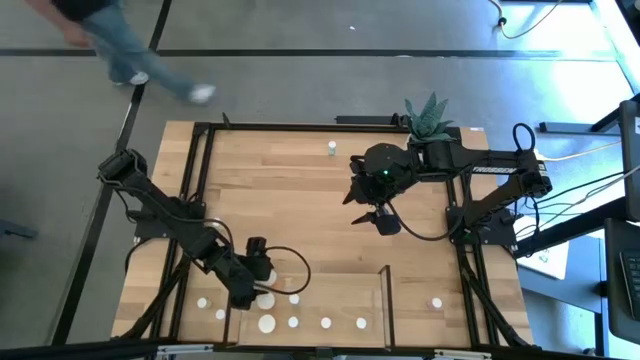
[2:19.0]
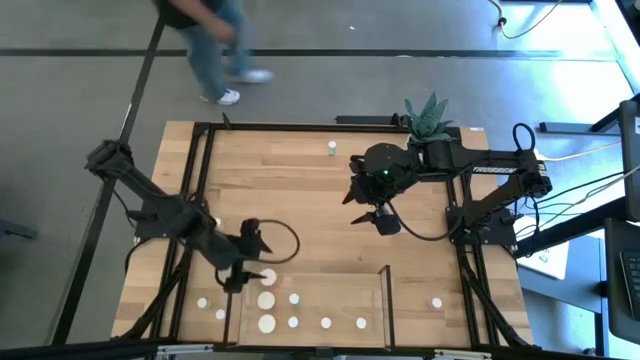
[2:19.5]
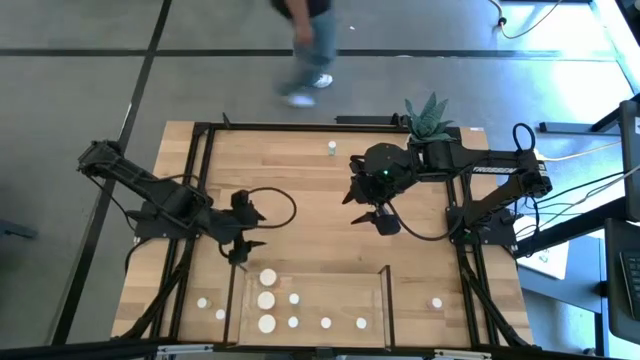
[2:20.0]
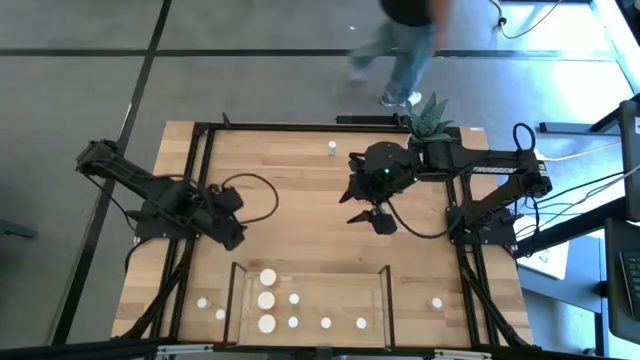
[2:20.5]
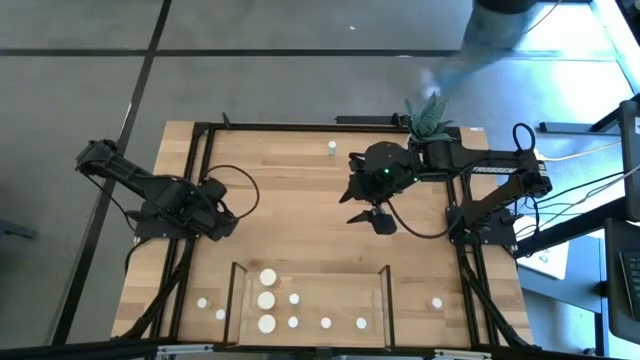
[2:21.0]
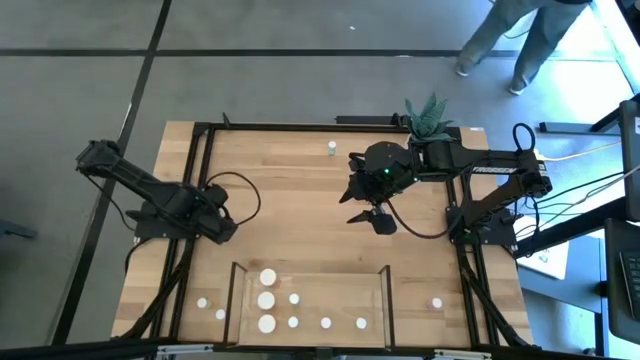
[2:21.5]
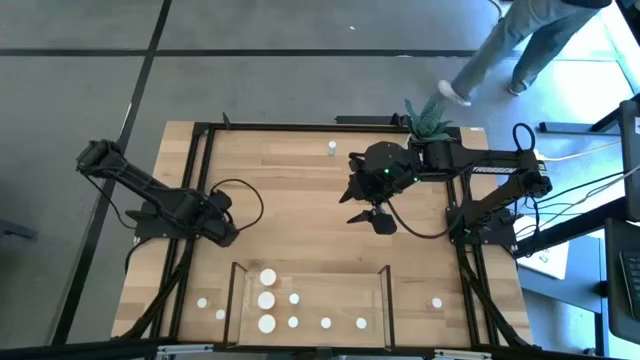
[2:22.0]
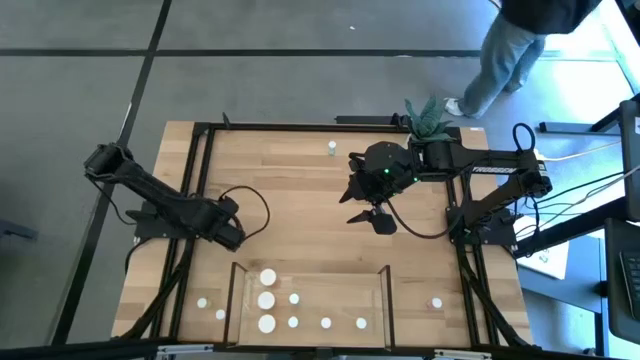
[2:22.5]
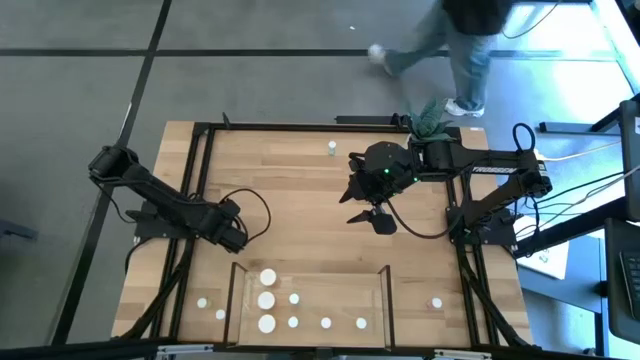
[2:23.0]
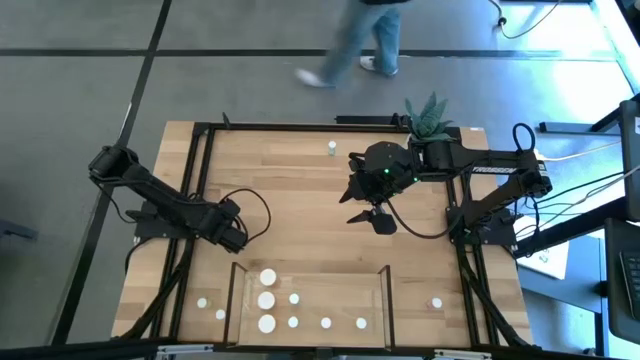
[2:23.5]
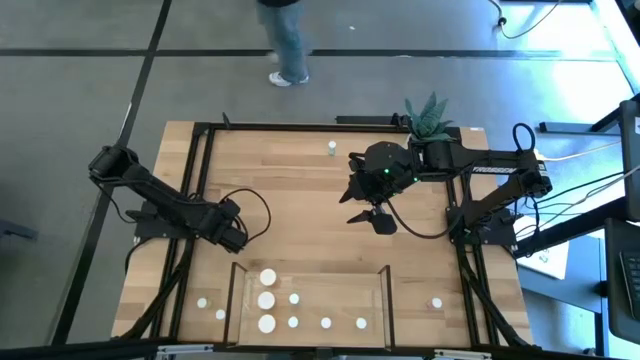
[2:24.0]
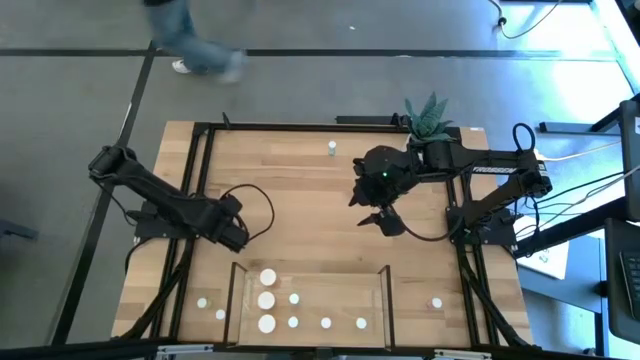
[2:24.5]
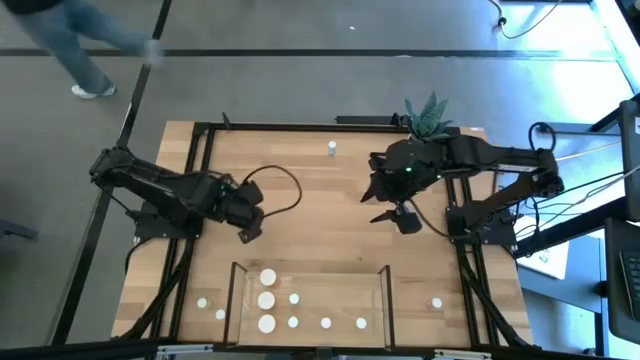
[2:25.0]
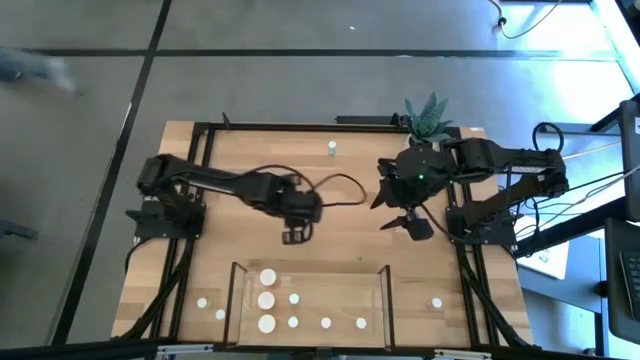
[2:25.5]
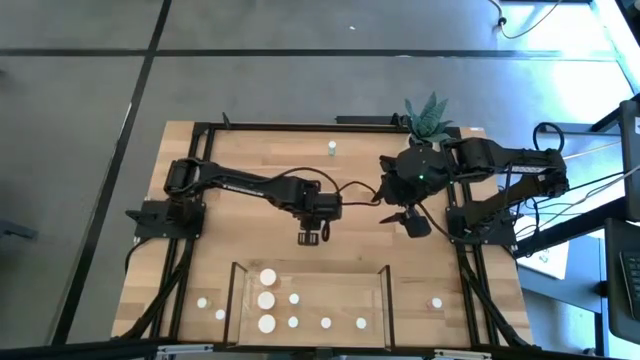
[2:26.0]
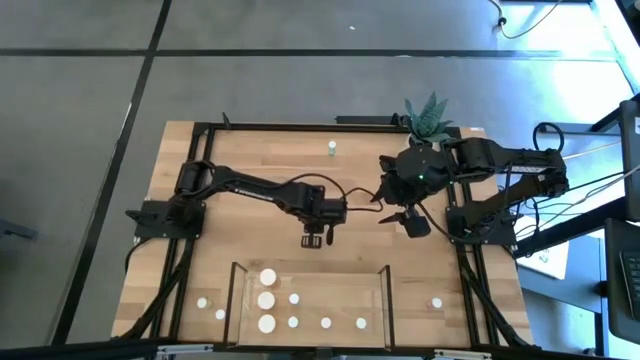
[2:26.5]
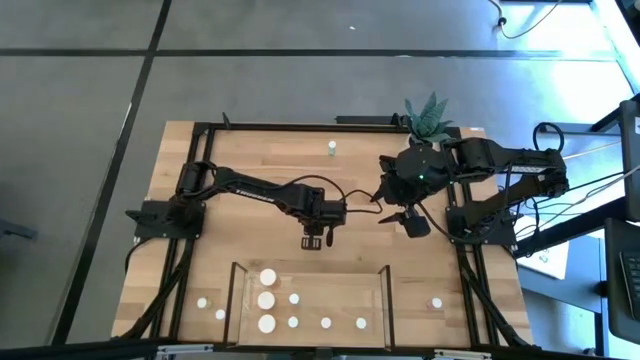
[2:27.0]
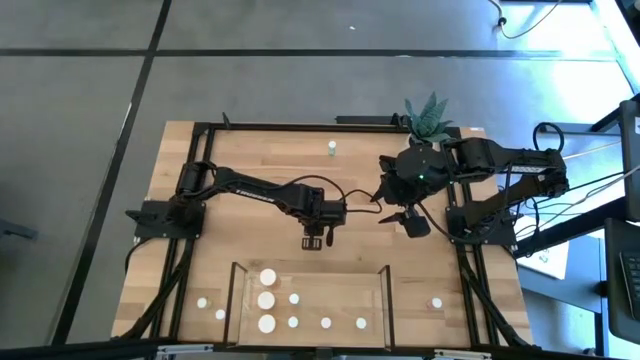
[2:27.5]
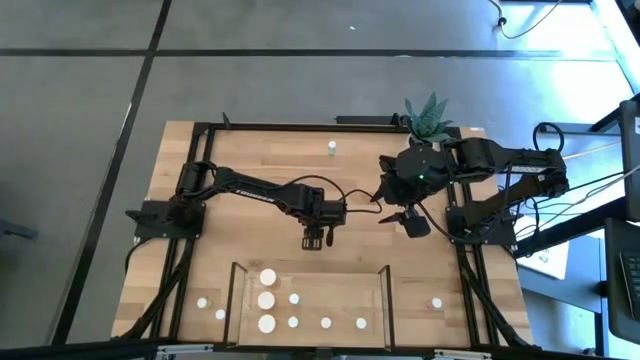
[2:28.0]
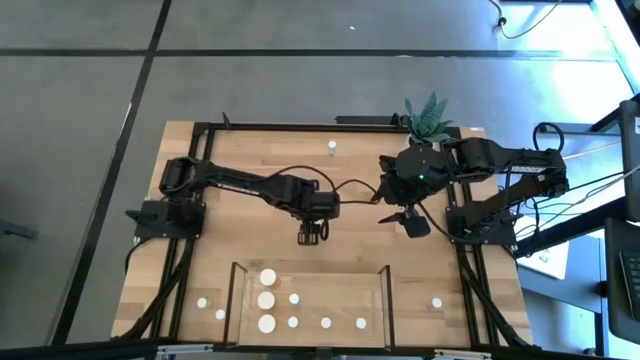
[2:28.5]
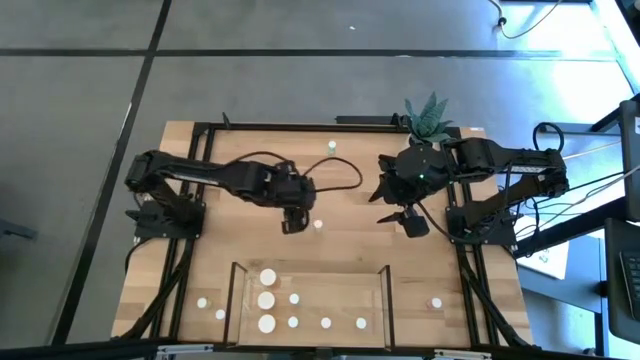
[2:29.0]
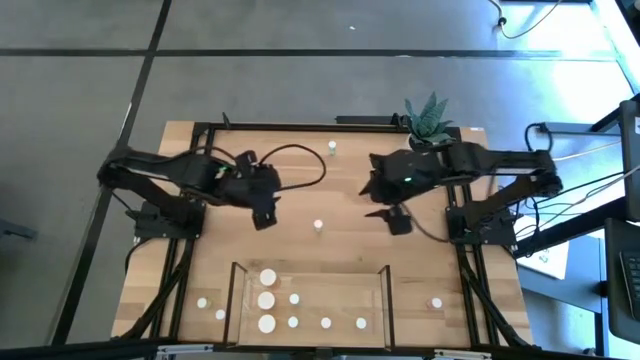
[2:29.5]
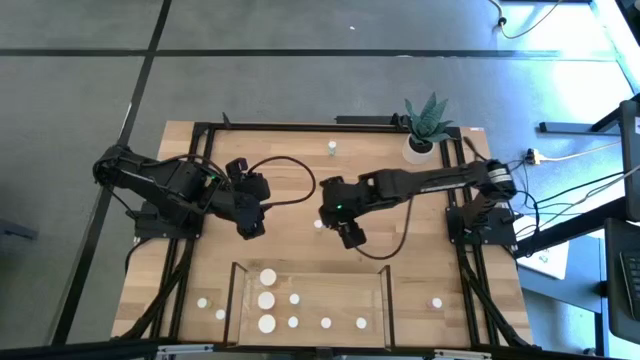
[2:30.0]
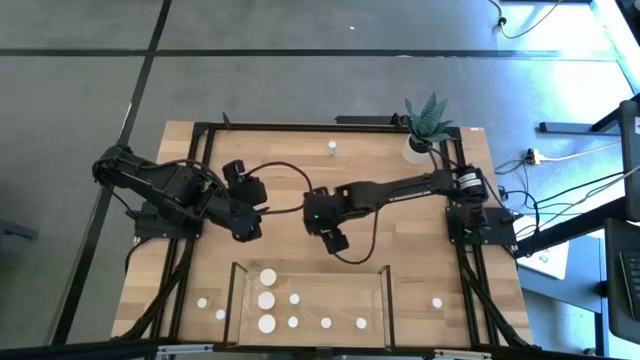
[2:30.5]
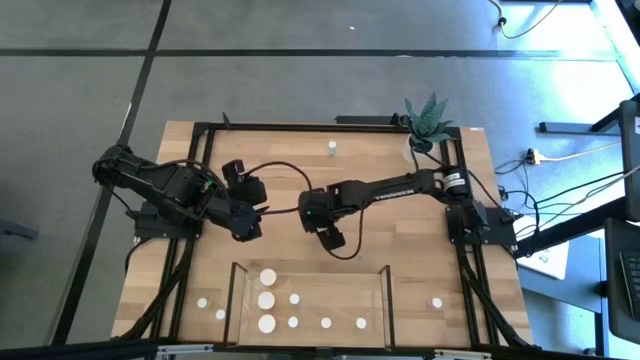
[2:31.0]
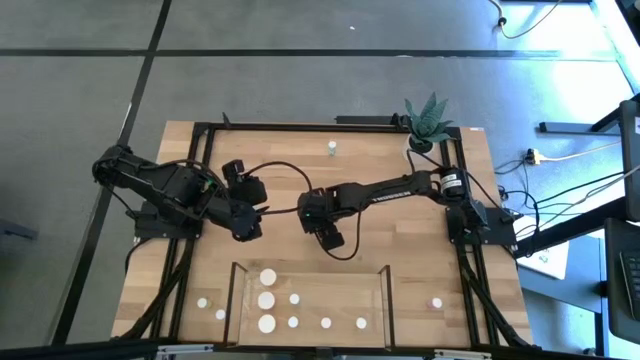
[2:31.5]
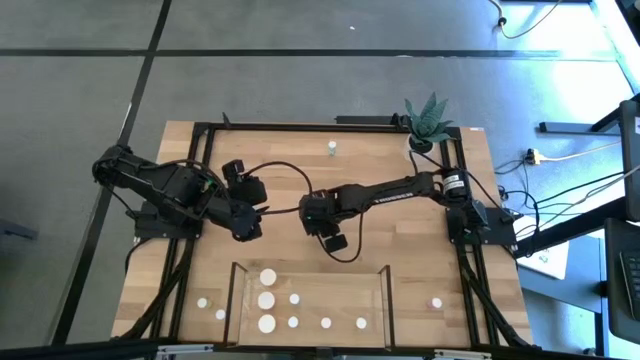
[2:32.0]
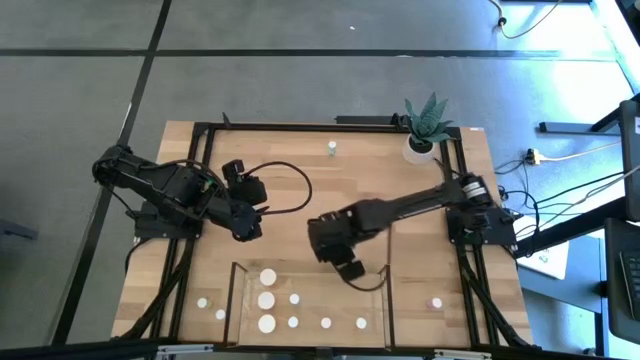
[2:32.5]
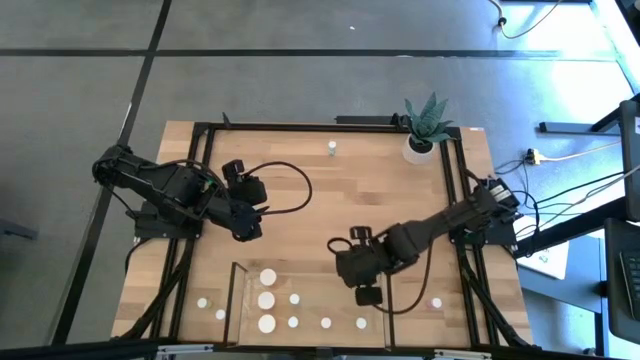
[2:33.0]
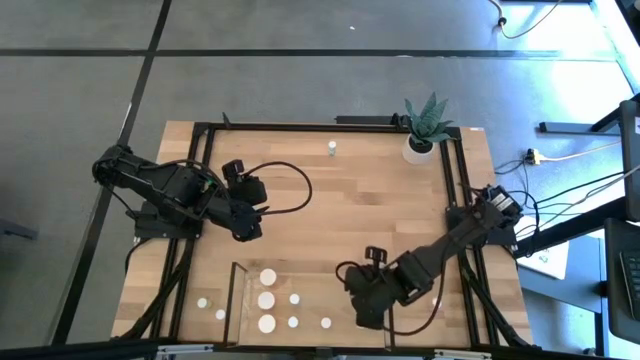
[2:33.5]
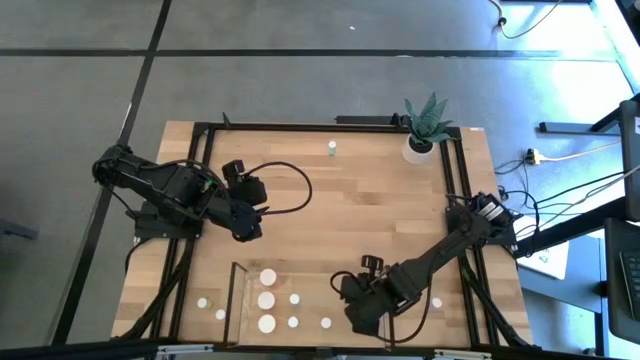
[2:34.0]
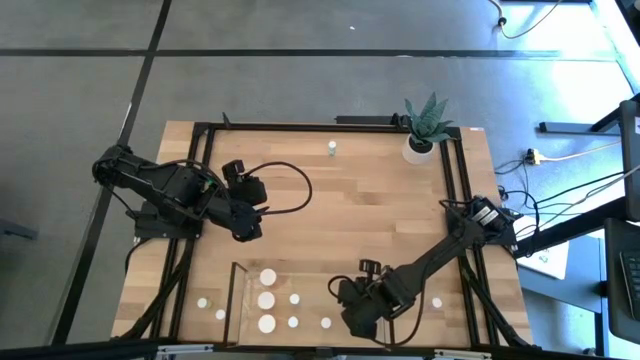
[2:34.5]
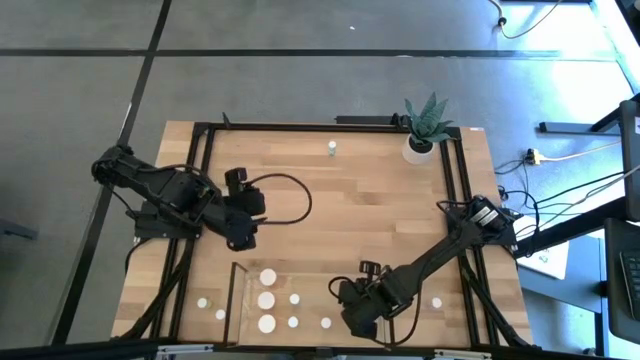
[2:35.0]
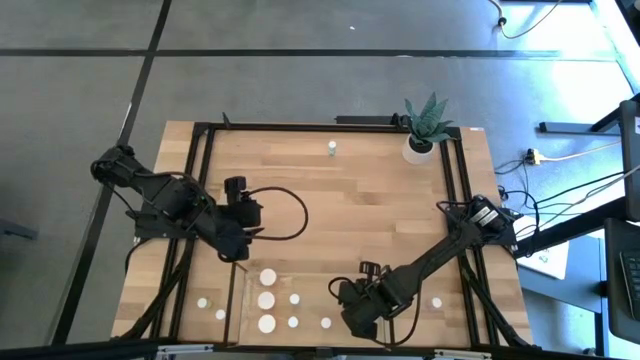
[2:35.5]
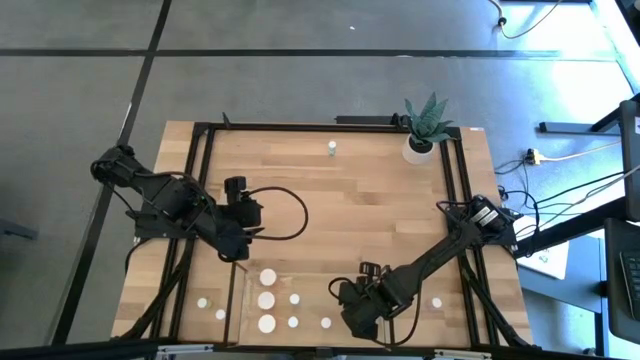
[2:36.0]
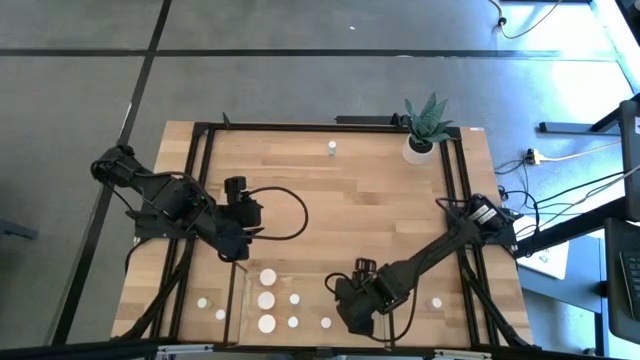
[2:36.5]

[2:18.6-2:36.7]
Task: Pick and place medicine bottles onto shelf by color
Put the top yellow pill bottle on the shelf aligned with the other yellow pill bottle

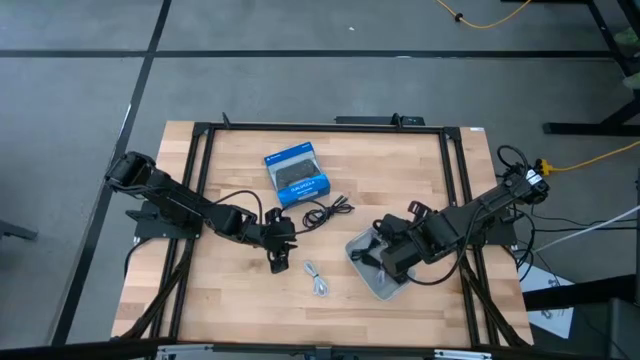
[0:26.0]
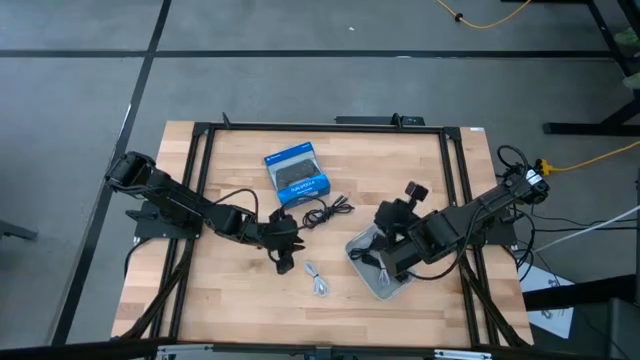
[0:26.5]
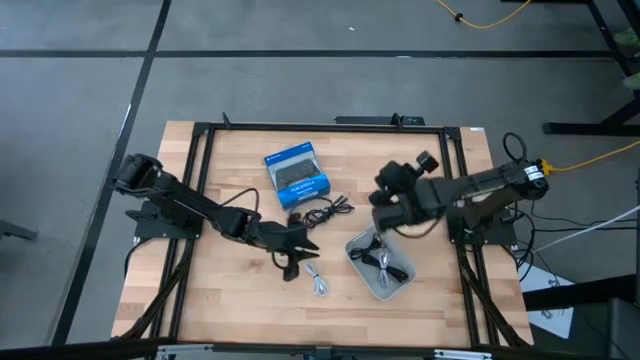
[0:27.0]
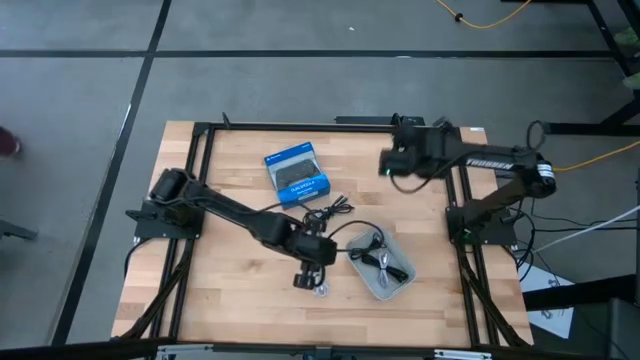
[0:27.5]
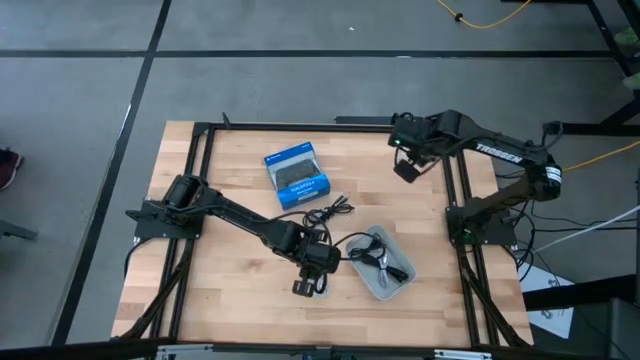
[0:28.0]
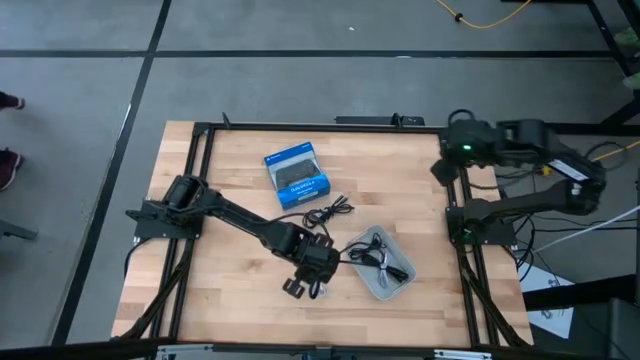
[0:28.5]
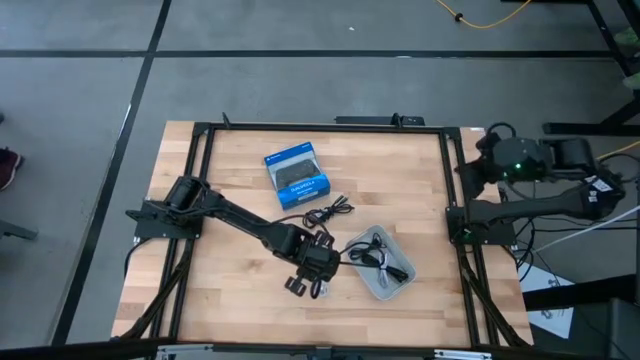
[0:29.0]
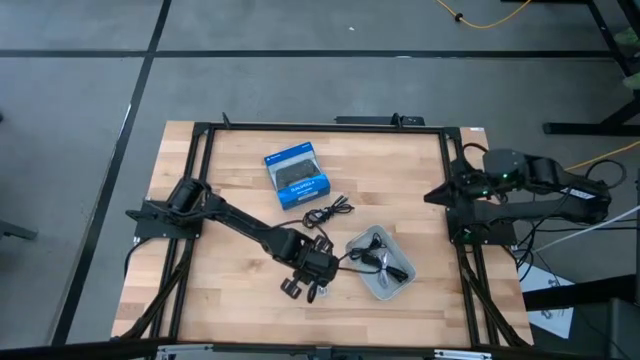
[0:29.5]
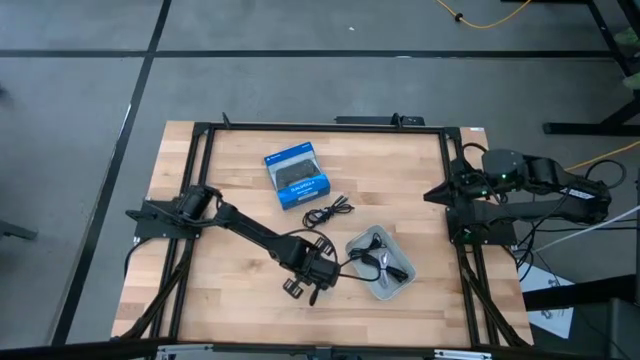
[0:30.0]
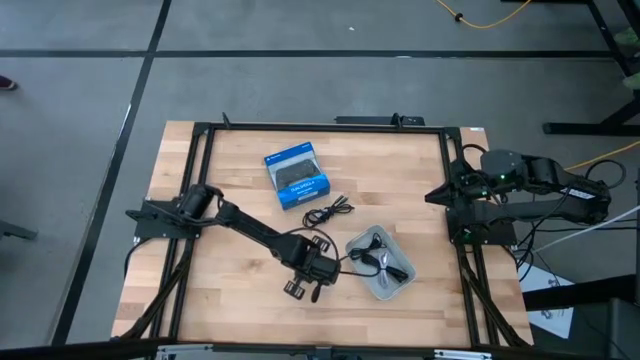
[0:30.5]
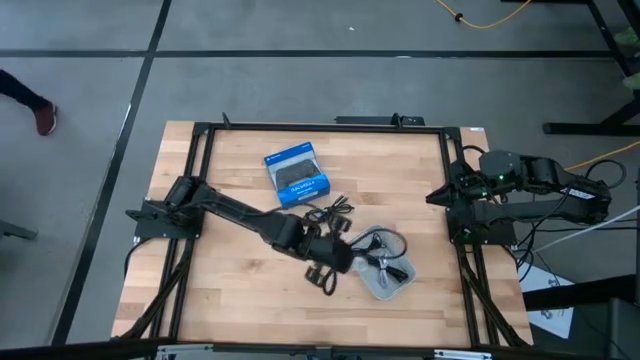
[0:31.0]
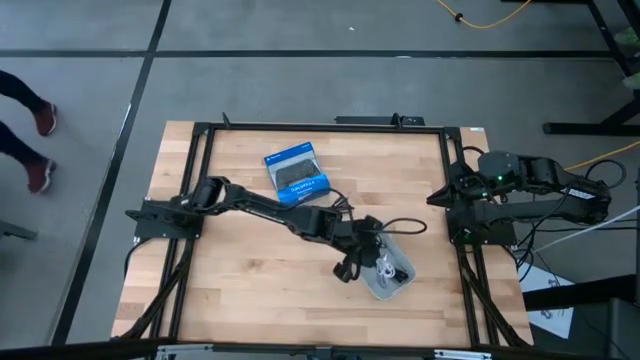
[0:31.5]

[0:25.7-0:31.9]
Task: Pick and place USB-C Cables
Put the white charger cable into the white bin
